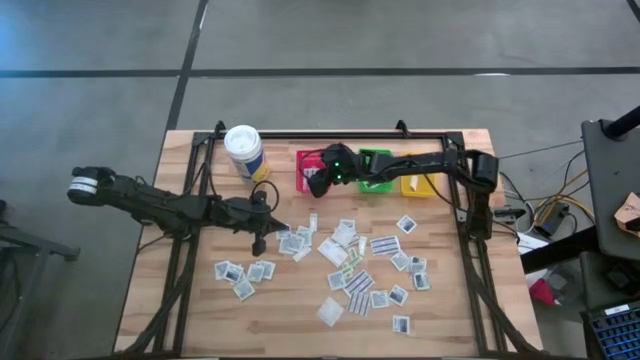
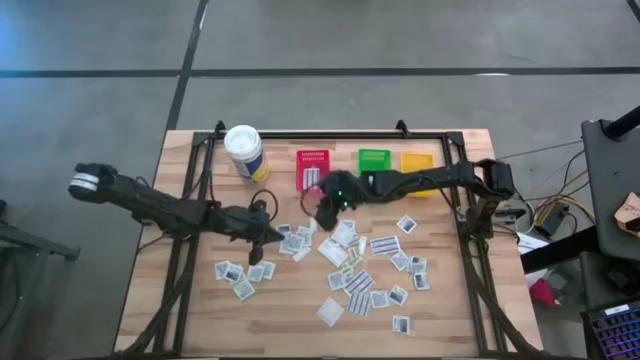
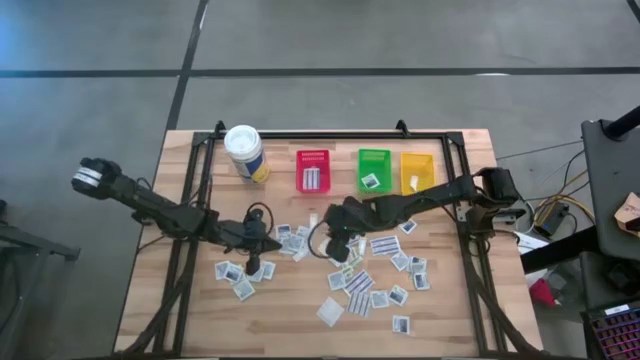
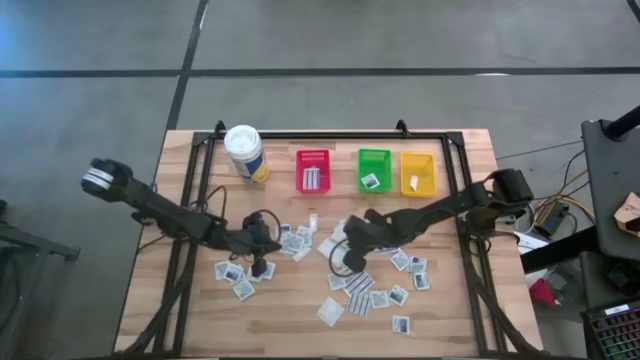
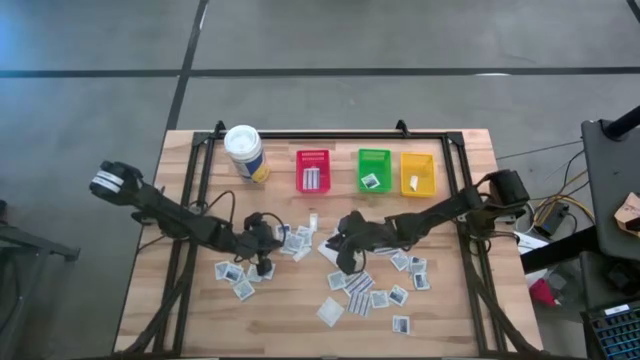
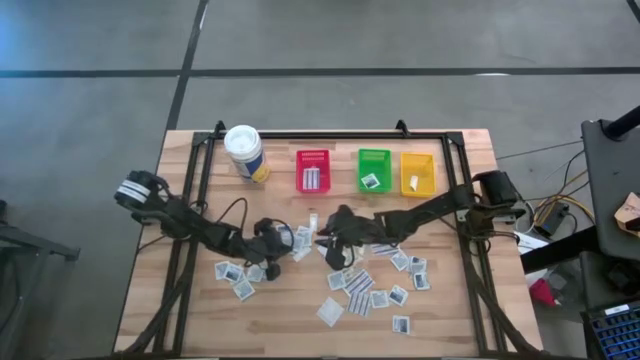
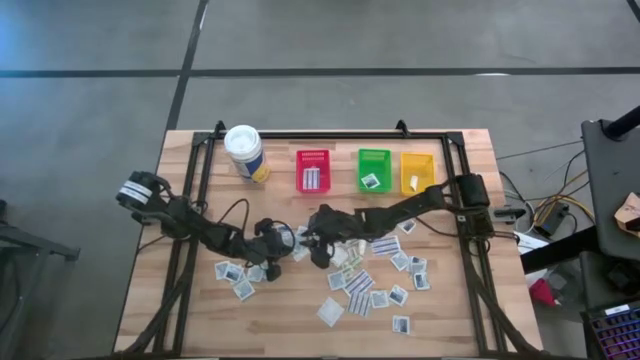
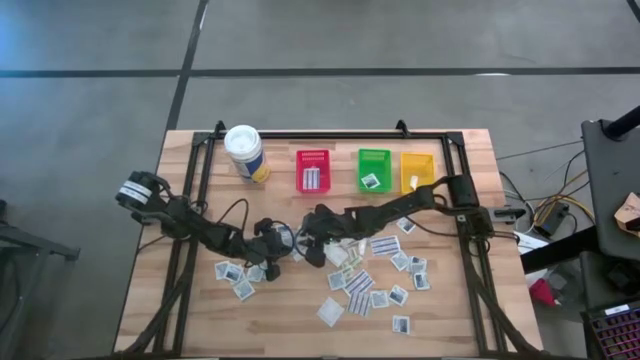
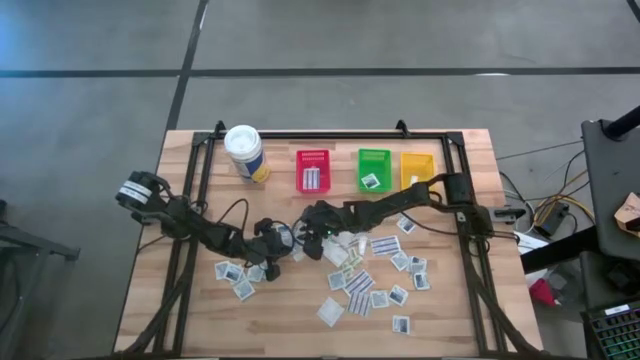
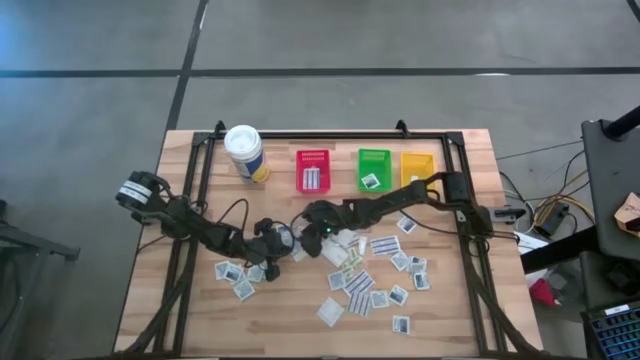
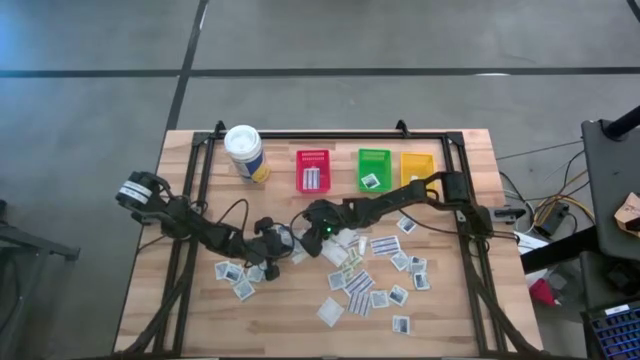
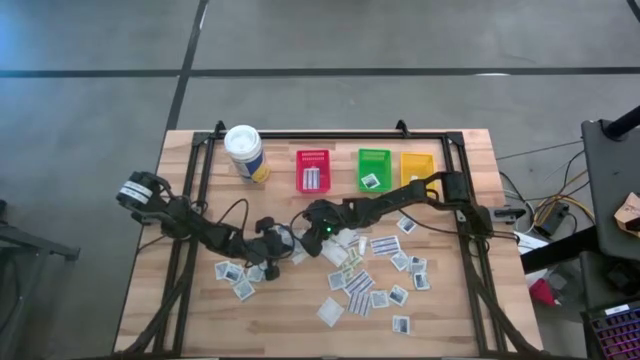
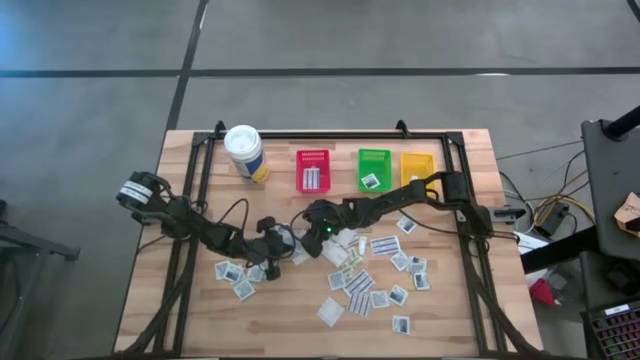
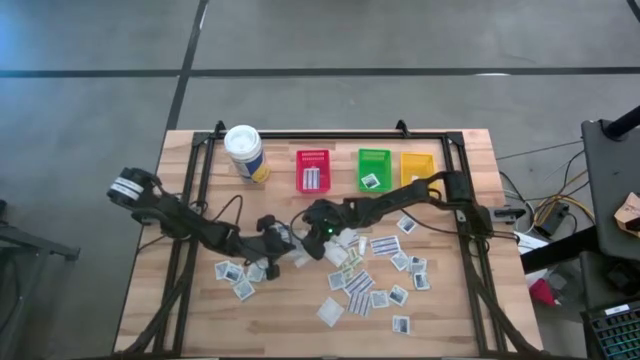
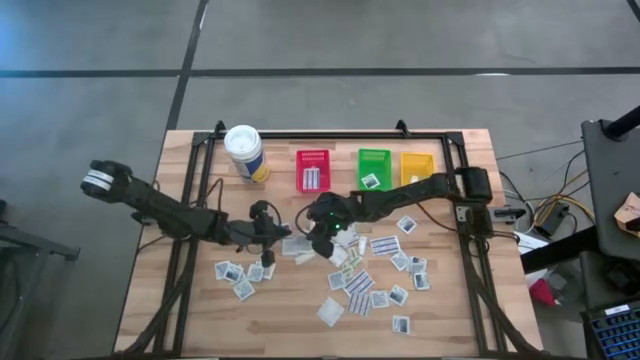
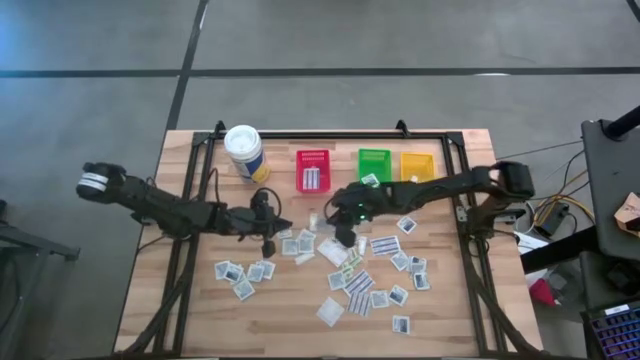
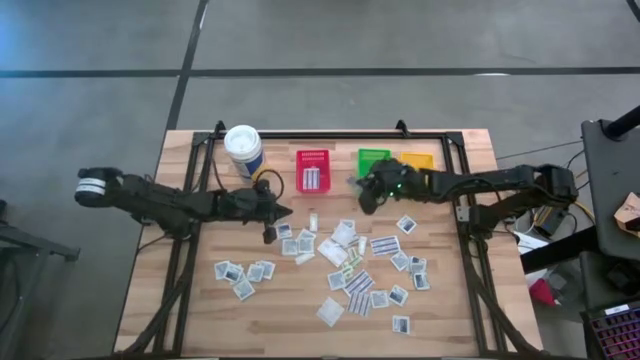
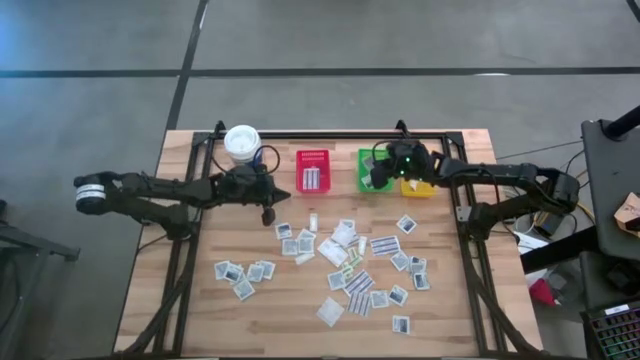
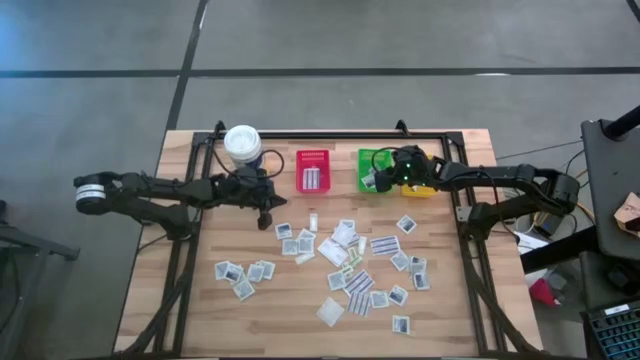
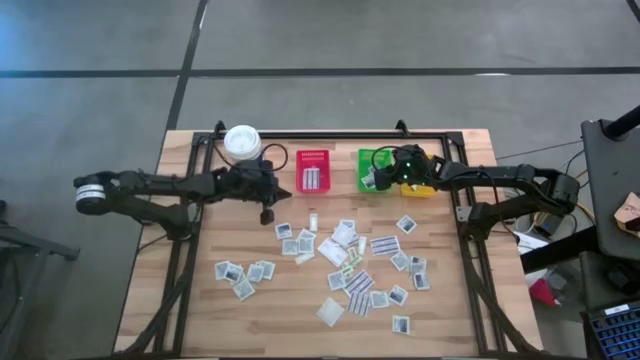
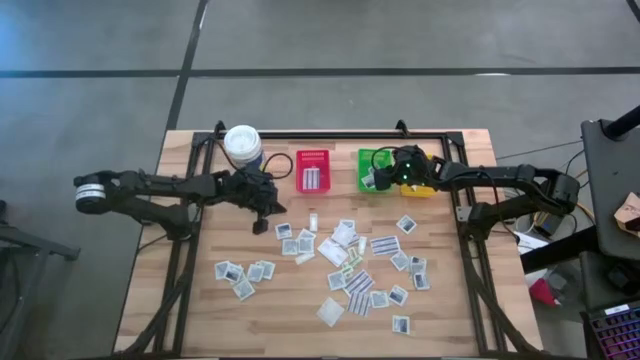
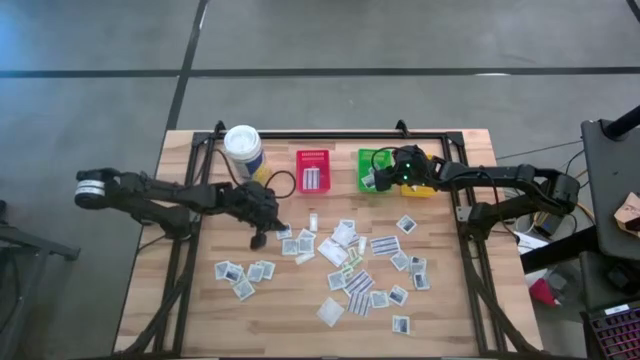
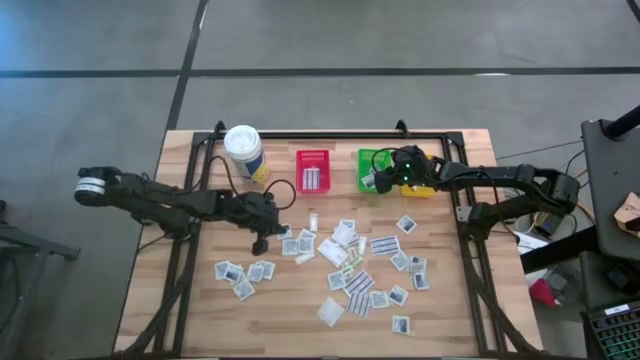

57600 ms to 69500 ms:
Task: Pick & Place First Aid Supplies
Put the alcohol pad in the green bin

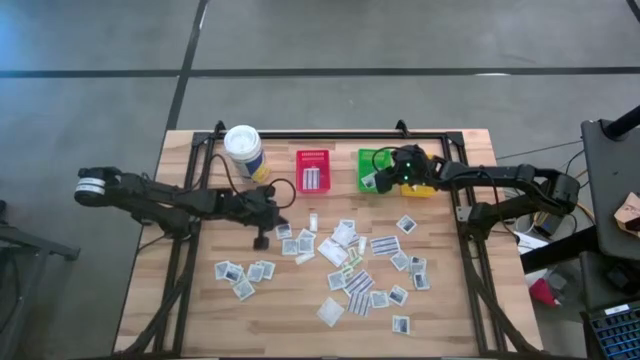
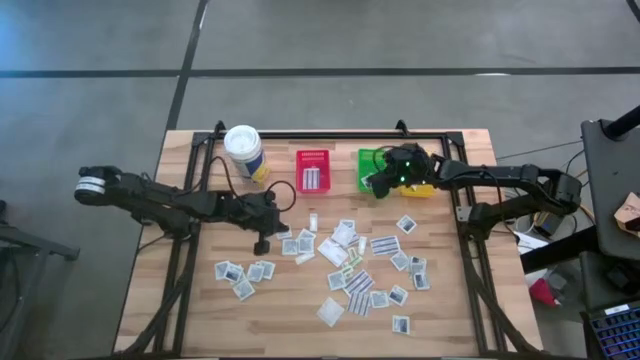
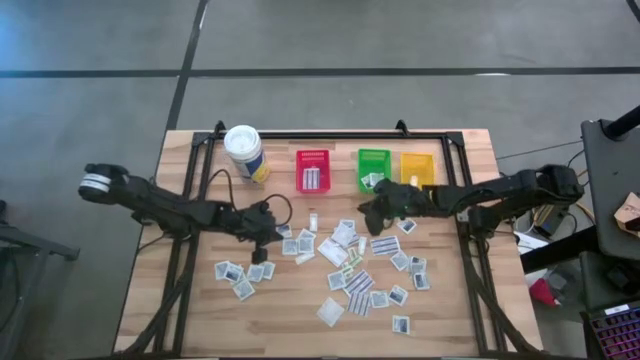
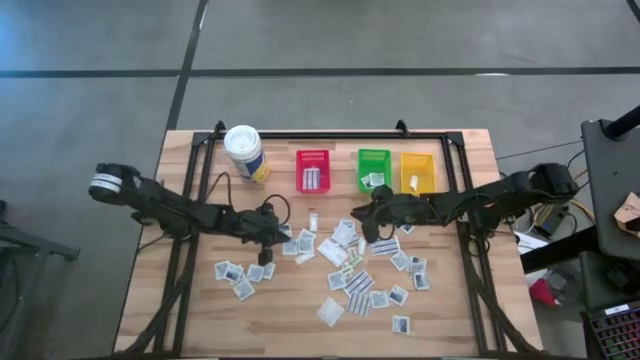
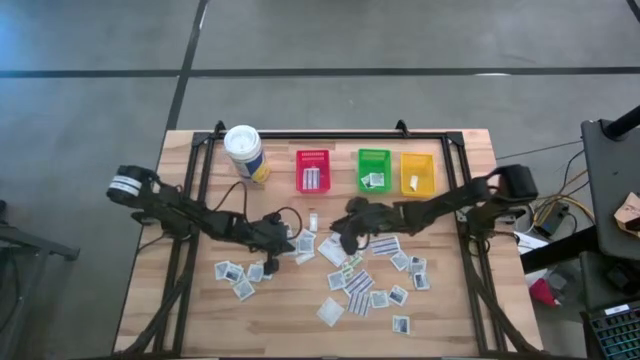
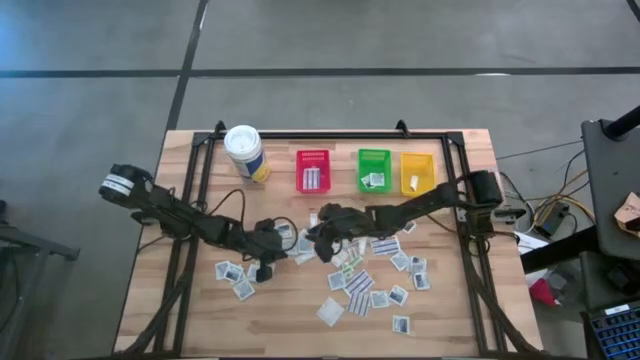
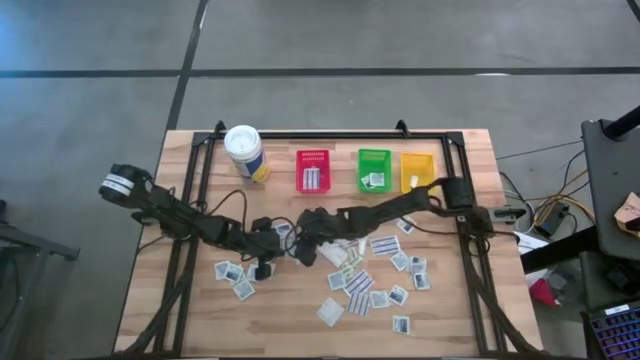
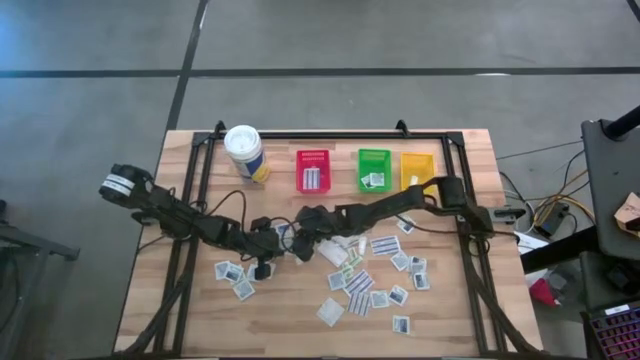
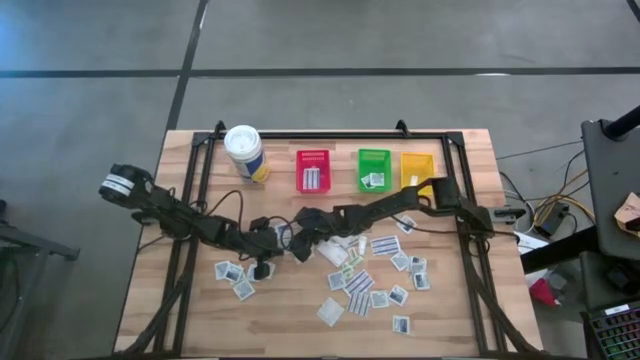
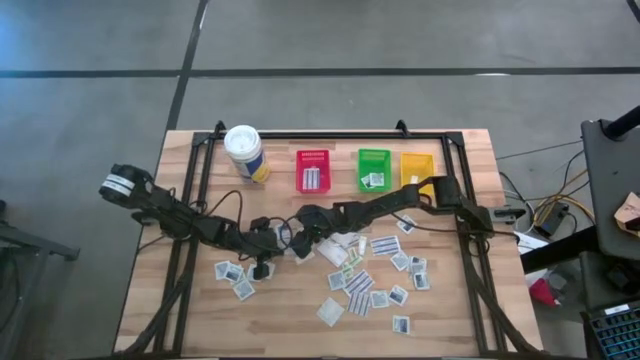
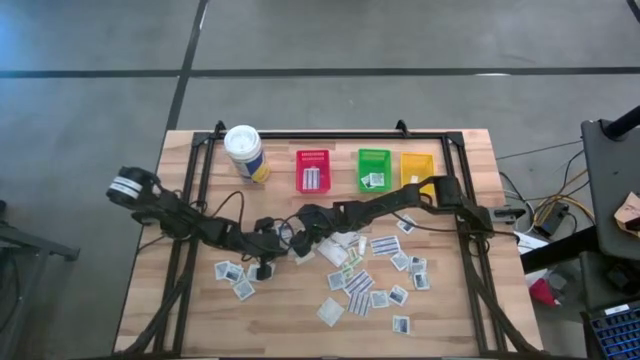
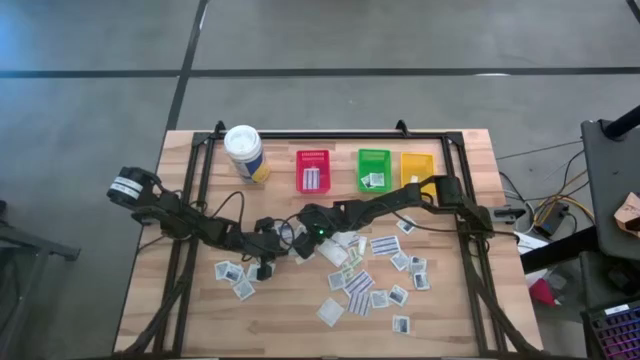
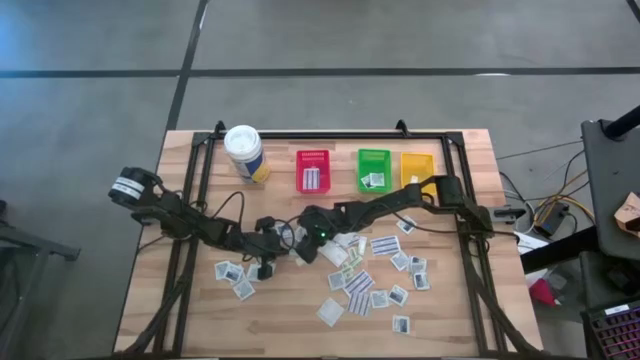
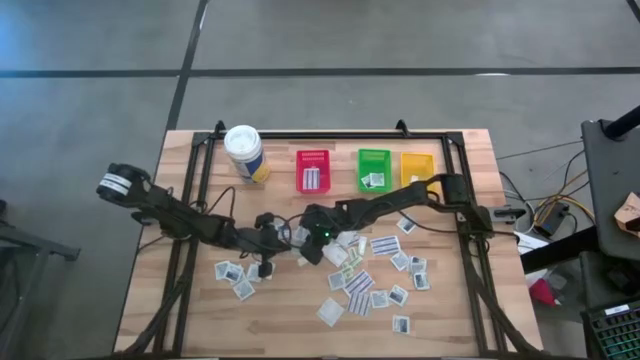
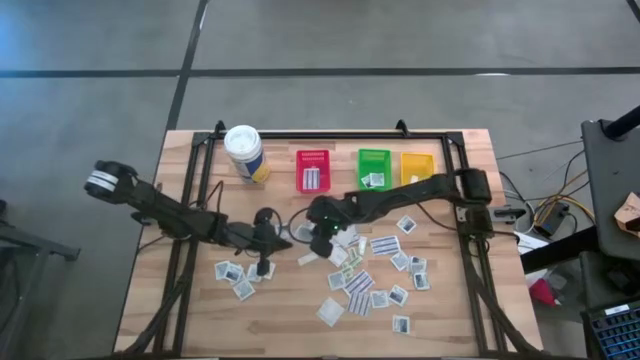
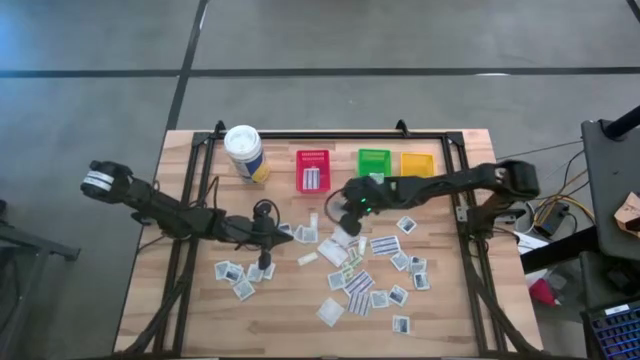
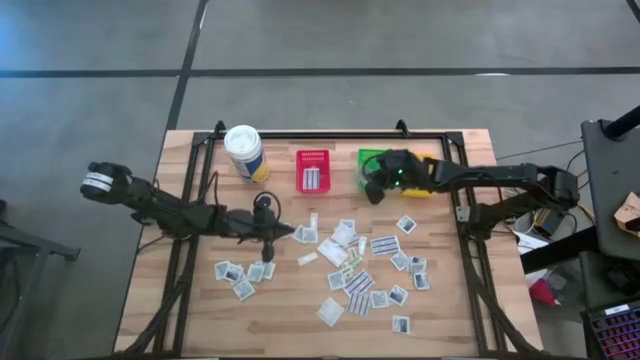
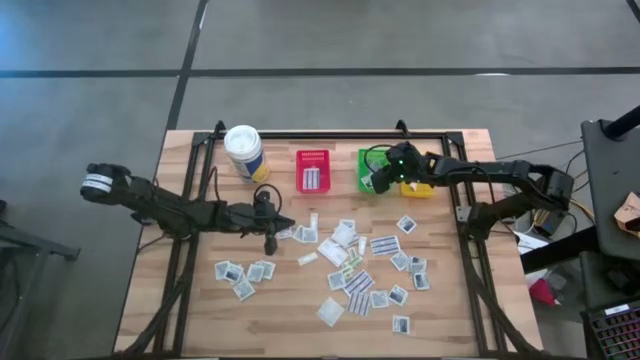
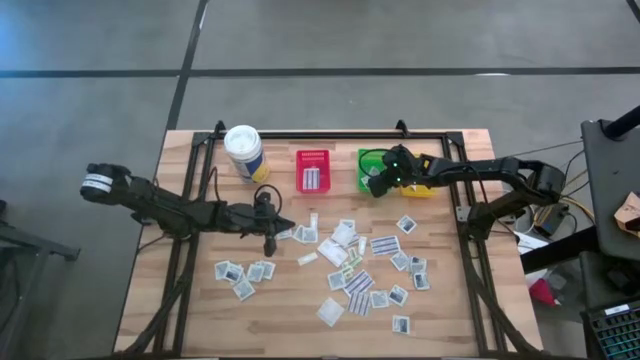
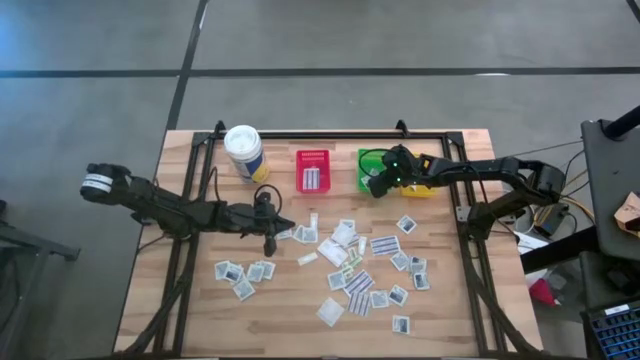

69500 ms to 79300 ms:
Put the alcohol pad in the green bin
